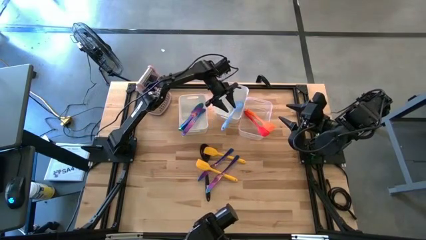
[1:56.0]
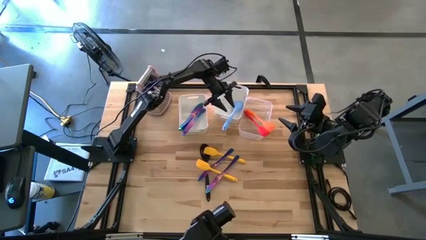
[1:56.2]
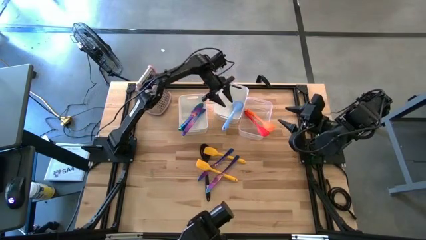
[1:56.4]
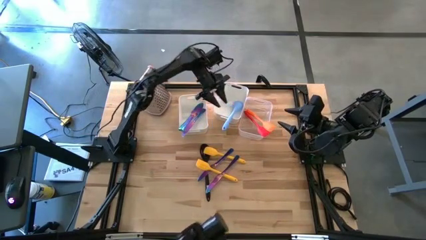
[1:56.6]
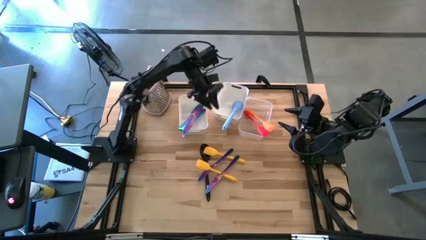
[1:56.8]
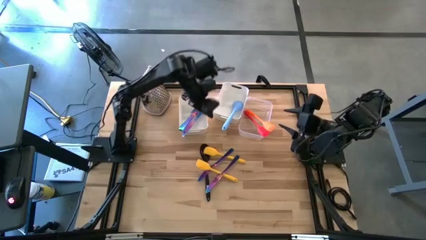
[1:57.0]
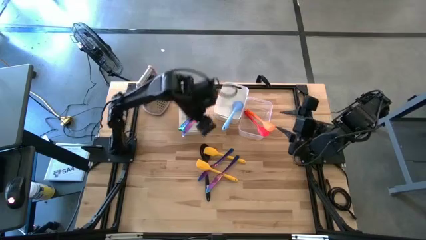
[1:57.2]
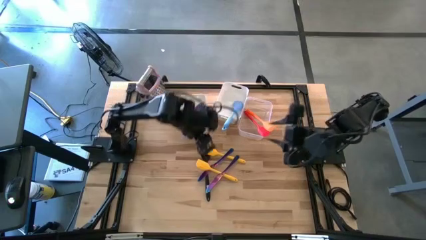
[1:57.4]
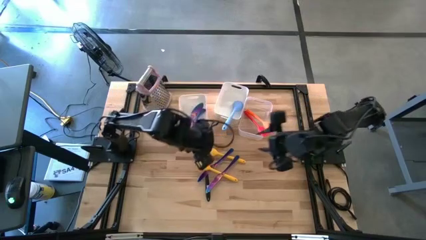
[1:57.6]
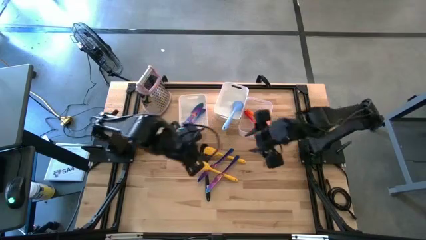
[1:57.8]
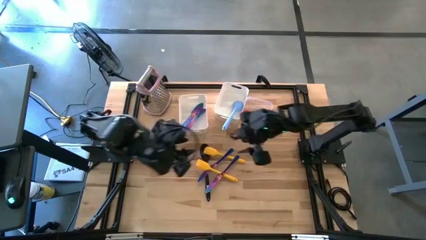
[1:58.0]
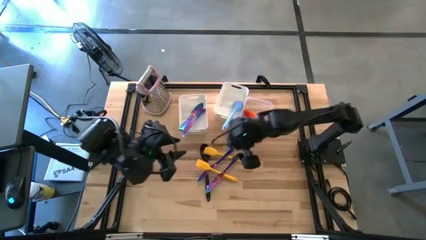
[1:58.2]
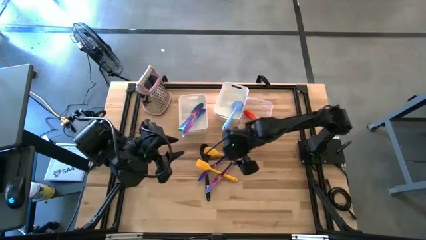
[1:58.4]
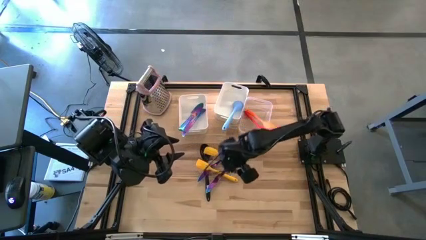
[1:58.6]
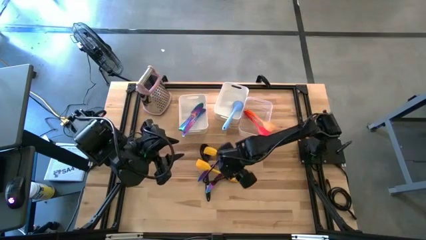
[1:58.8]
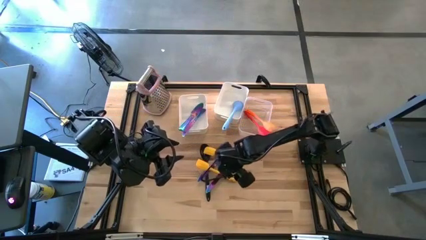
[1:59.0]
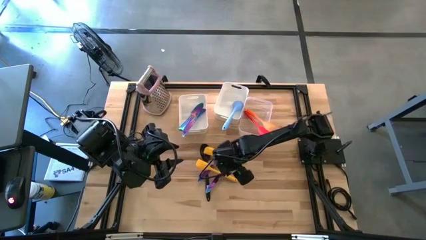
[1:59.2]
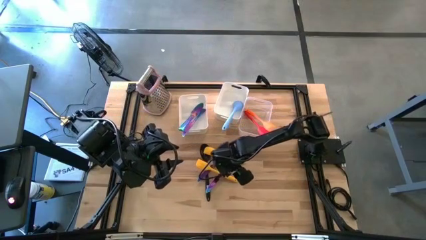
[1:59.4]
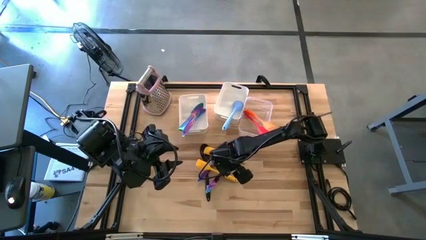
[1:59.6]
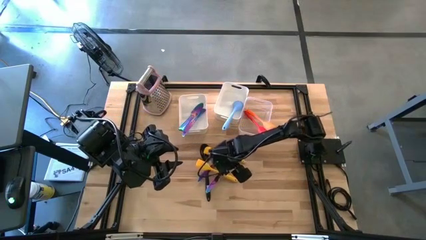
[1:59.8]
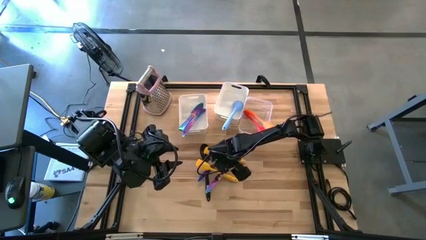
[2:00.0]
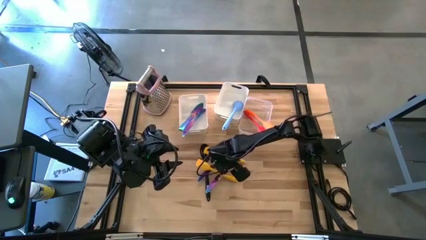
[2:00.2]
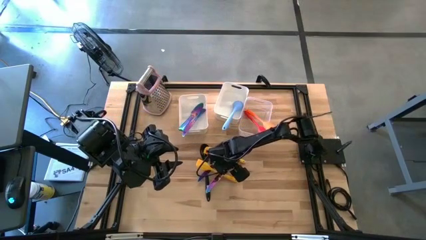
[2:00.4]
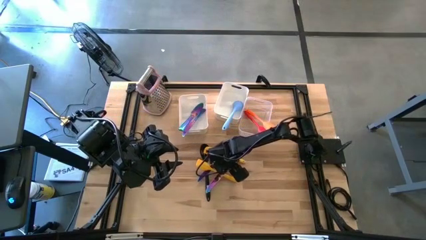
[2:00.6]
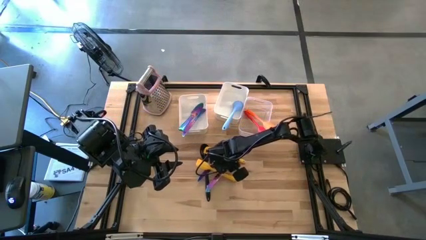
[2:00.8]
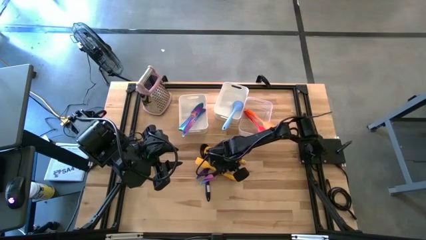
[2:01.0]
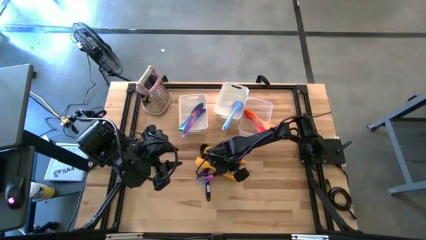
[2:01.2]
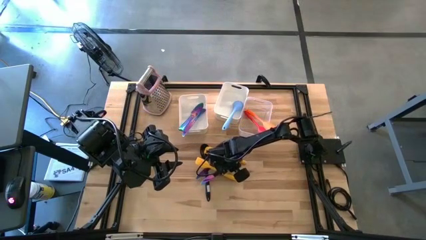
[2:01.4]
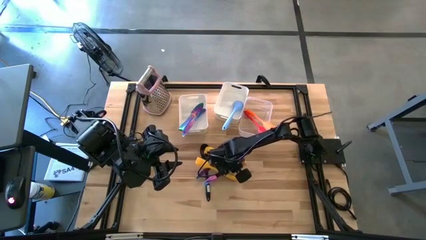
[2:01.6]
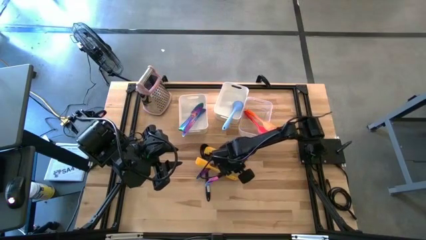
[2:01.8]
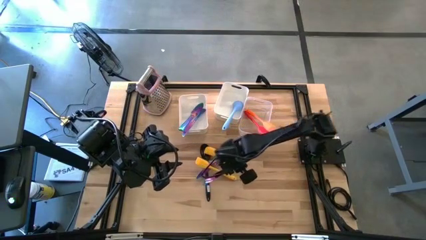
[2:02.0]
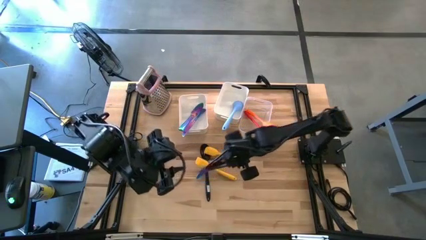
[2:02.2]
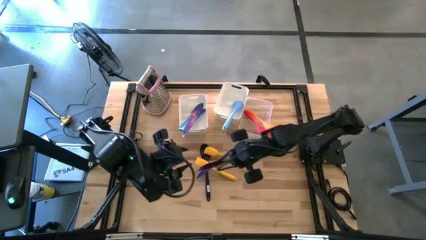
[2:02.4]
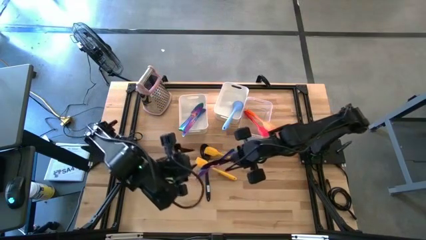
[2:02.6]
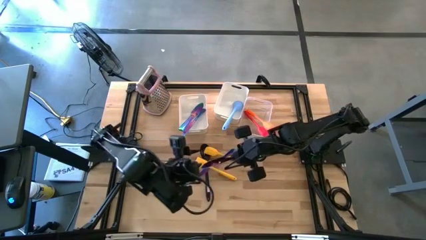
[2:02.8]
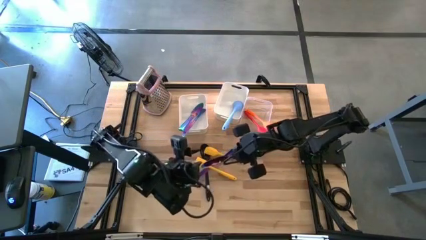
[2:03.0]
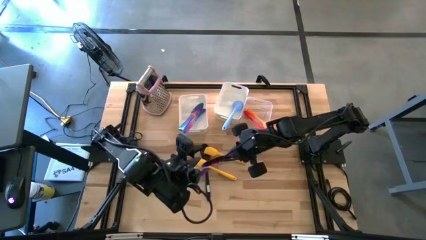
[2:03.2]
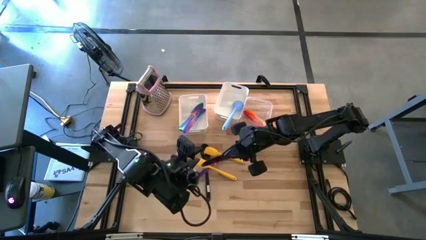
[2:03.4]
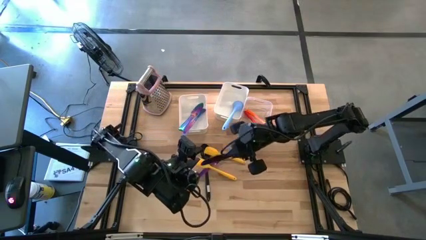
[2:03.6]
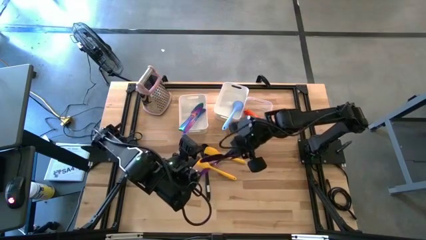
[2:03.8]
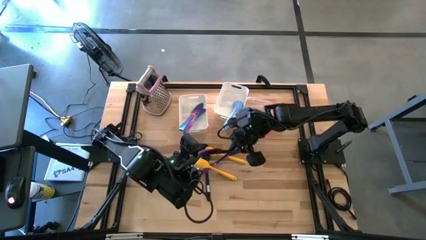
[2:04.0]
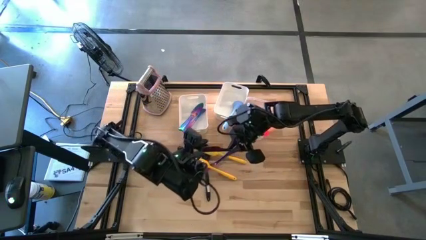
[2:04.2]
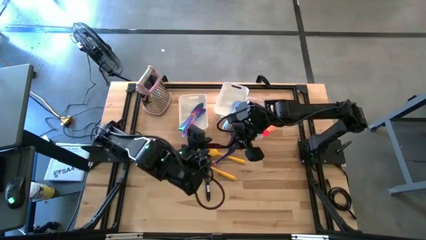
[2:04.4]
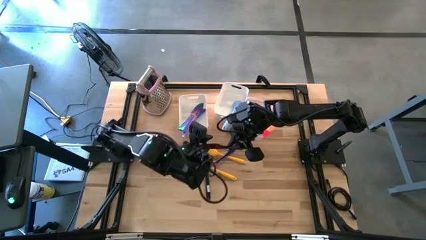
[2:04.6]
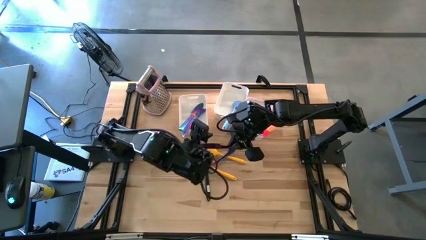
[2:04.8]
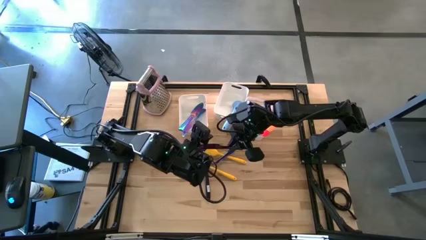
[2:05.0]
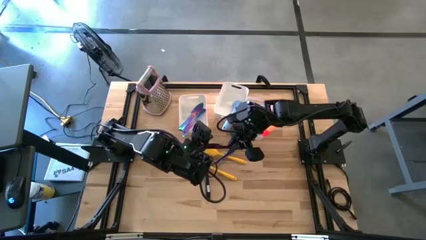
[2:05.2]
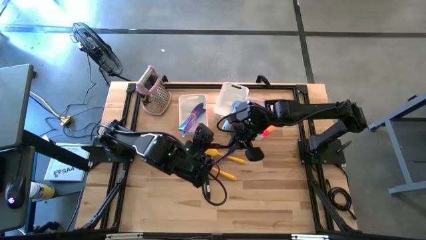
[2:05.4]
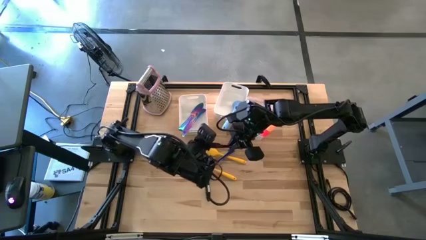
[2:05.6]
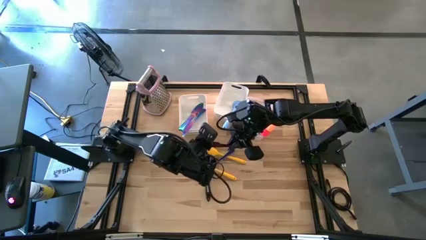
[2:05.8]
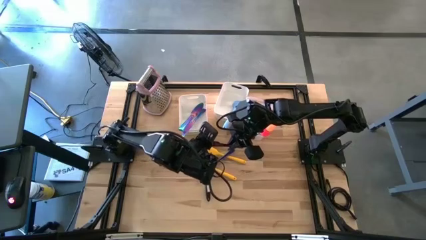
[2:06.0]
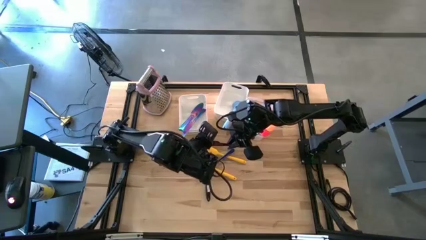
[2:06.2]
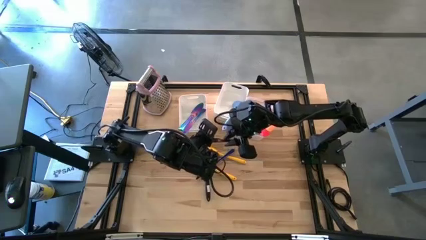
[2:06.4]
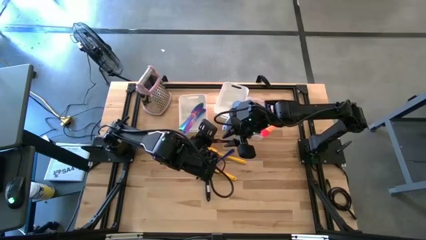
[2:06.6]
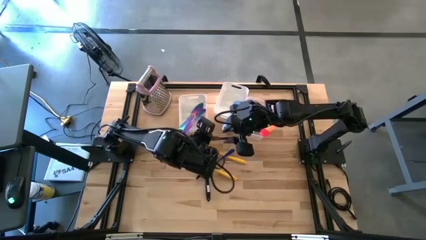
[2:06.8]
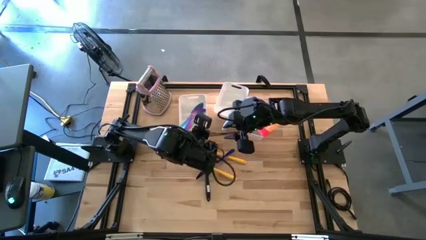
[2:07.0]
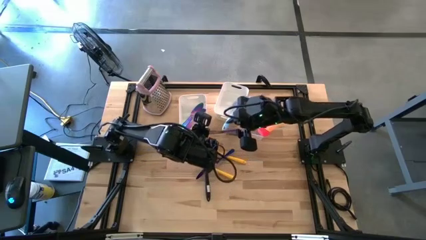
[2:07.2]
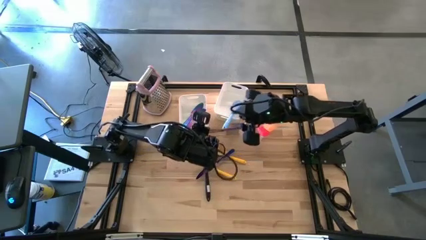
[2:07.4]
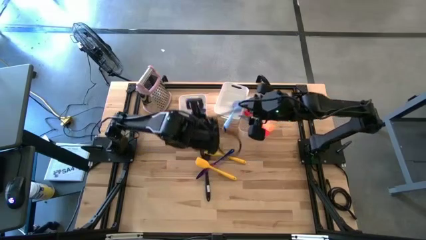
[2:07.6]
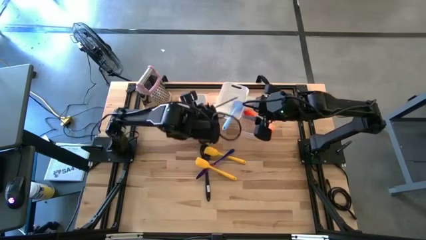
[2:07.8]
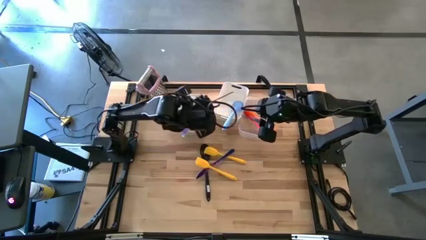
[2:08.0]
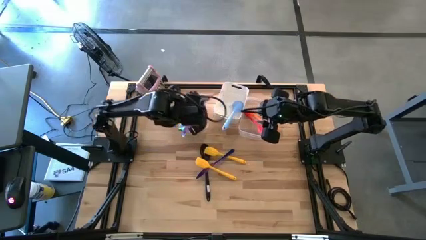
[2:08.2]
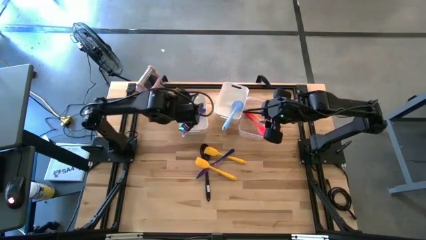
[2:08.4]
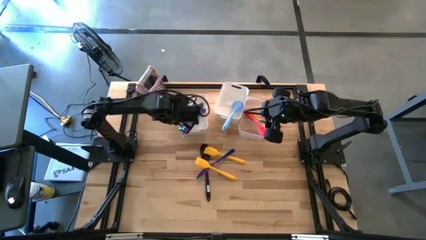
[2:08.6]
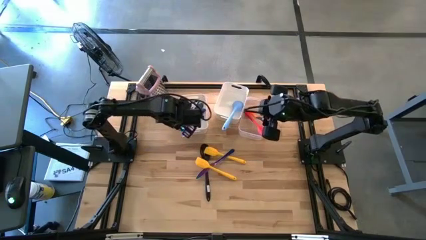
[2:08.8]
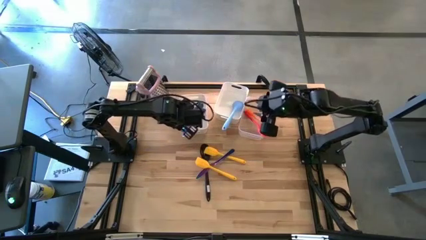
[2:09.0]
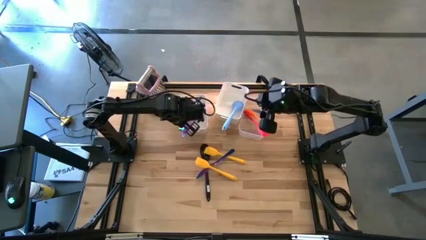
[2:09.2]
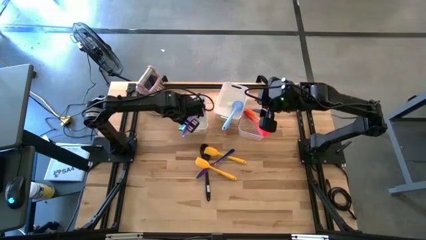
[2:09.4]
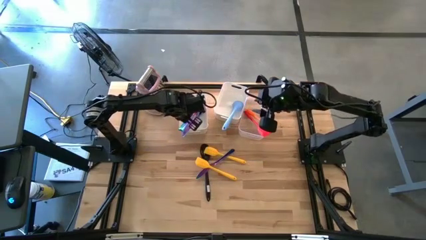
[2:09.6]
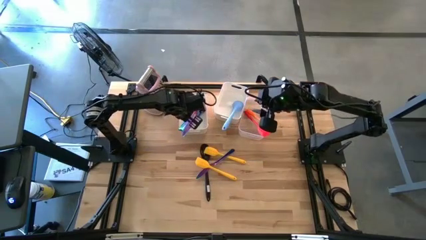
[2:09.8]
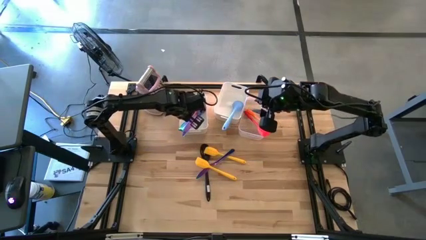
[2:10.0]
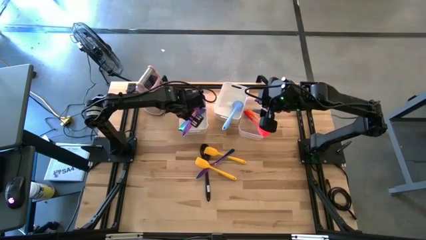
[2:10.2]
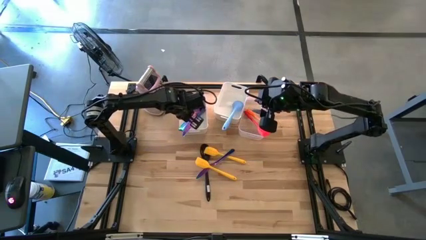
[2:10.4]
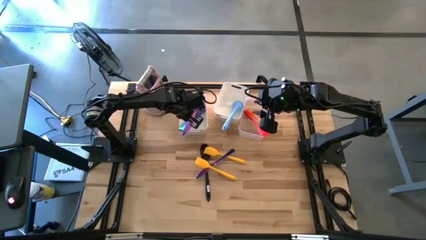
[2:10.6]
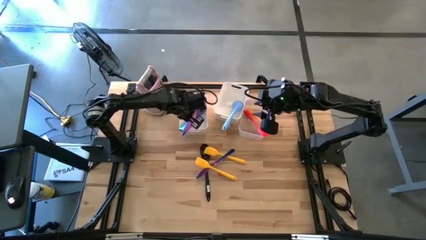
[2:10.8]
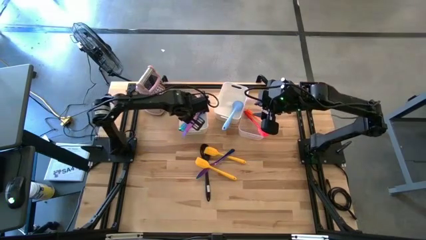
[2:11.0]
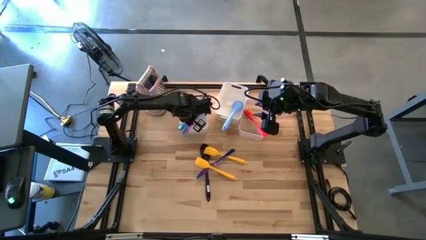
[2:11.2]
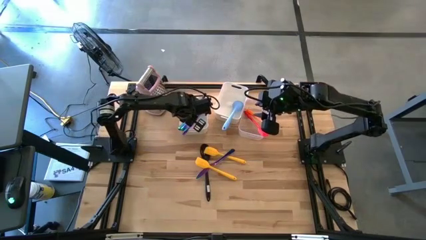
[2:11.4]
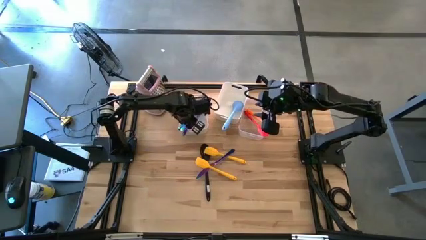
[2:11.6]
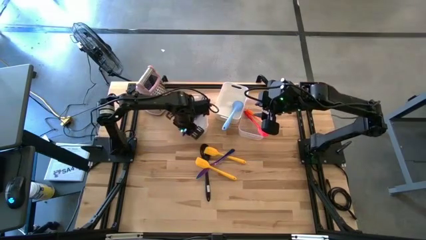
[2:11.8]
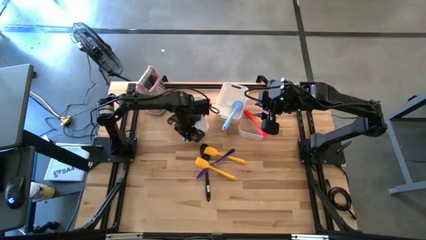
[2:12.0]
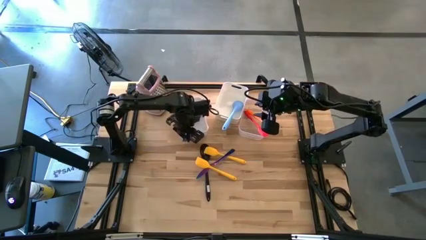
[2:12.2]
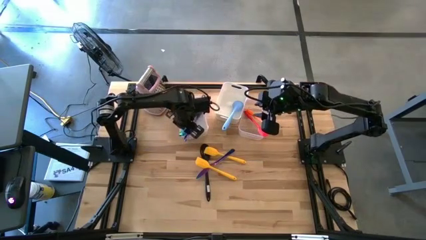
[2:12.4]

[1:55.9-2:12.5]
Task: Pick & Place Kitchen Items
Put the violet table knife into the left white bin
